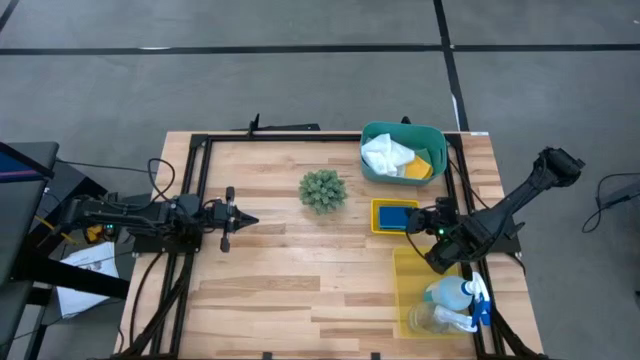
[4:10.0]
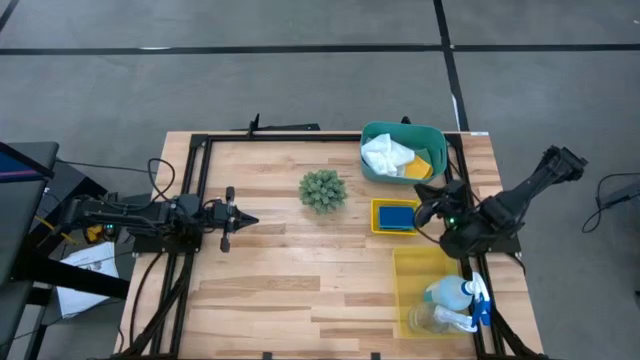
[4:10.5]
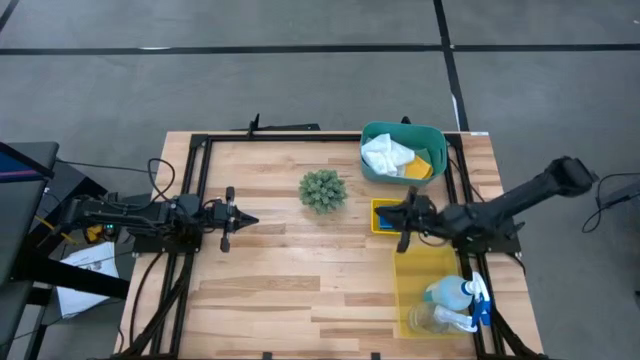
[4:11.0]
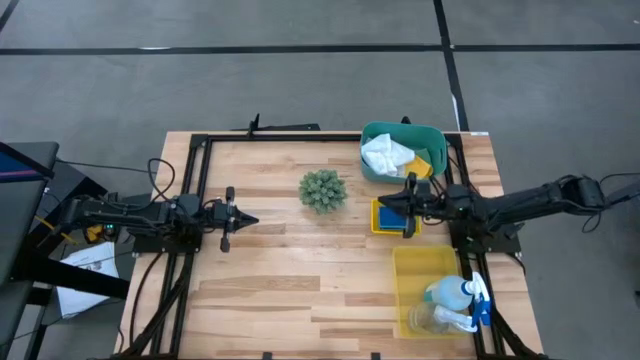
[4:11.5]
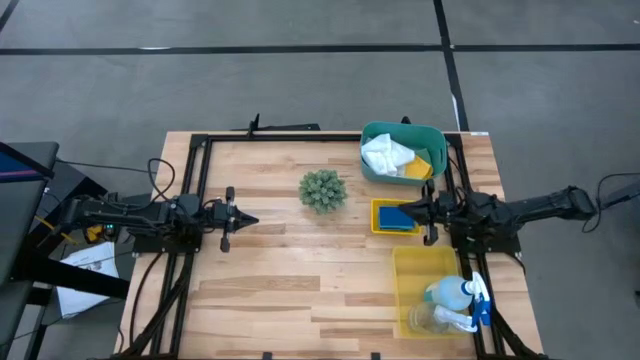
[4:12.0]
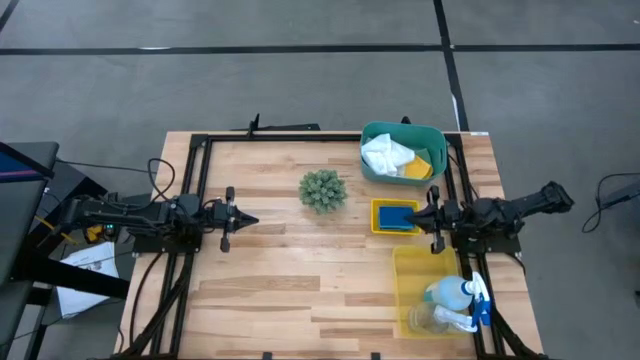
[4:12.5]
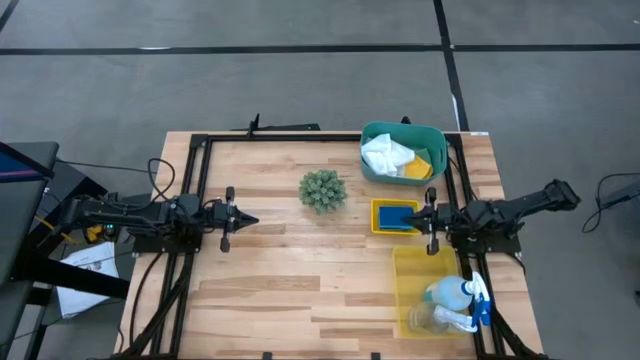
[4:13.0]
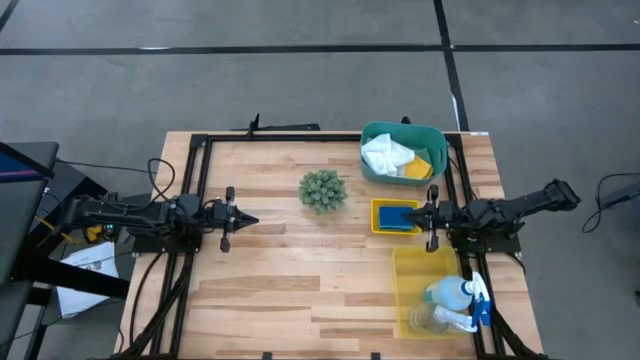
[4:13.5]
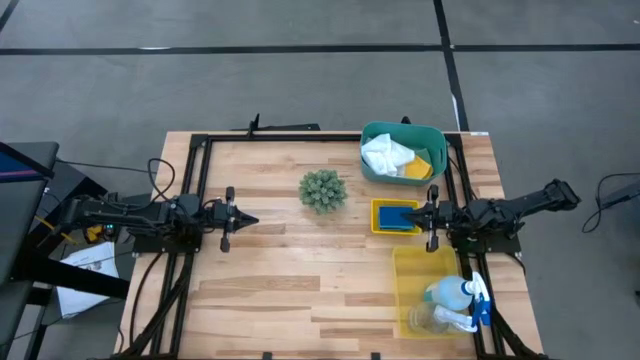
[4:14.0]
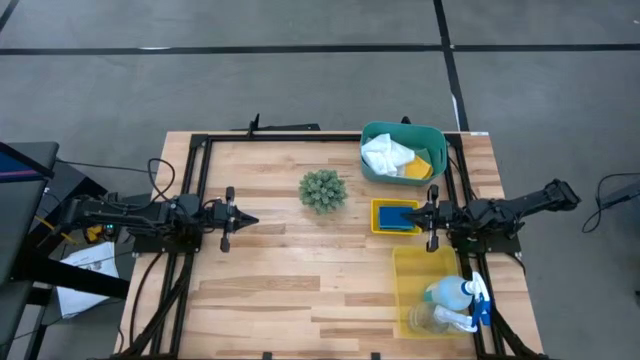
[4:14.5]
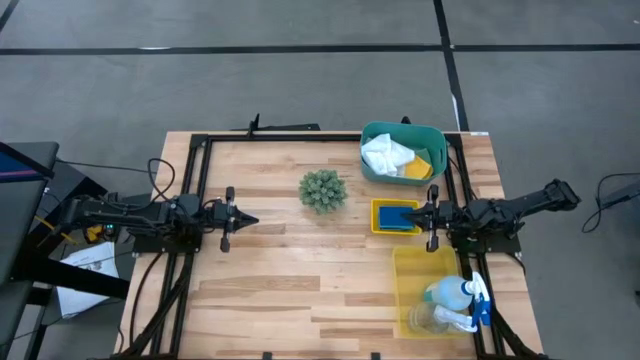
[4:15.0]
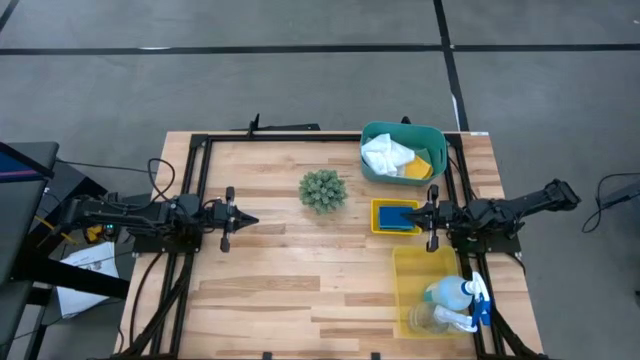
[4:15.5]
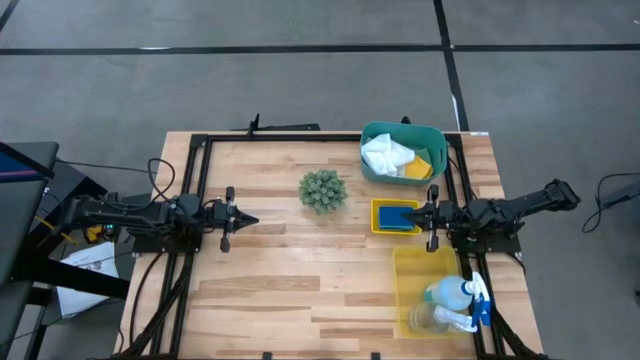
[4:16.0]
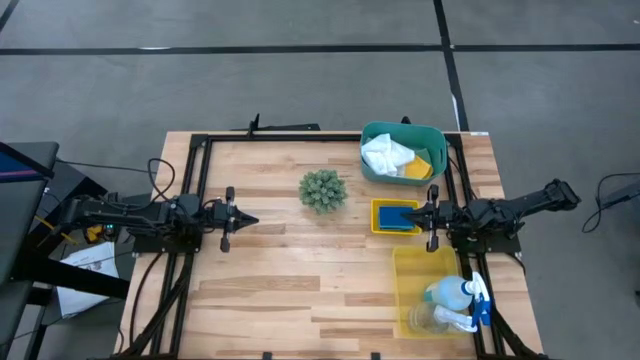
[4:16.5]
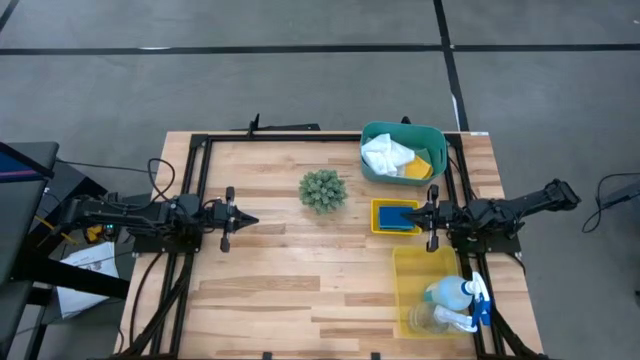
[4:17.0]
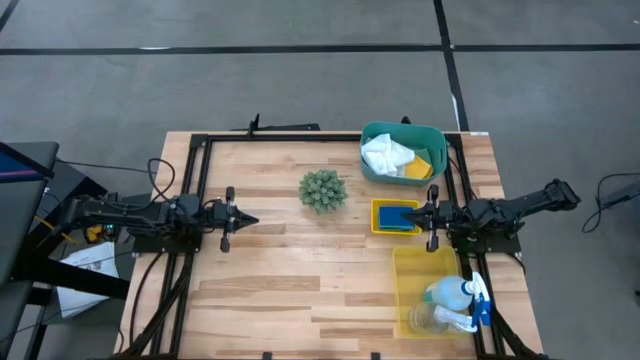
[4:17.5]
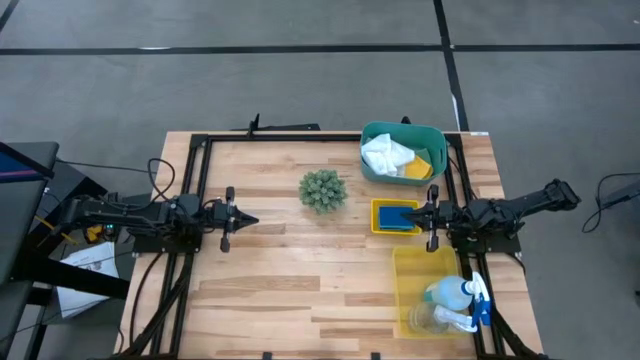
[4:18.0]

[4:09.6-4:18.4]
Task: Pick & Place Kitchen Items
Return to Home Position

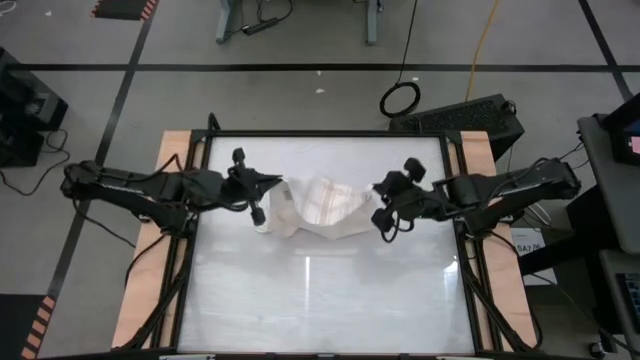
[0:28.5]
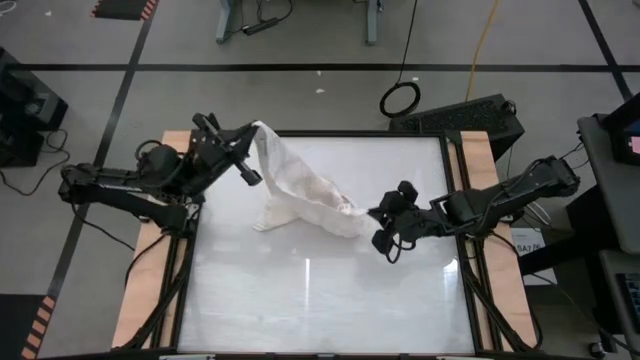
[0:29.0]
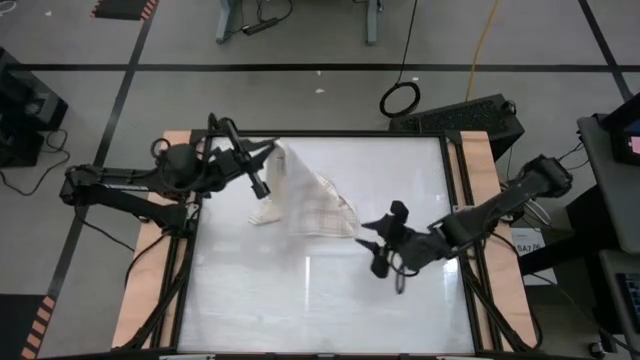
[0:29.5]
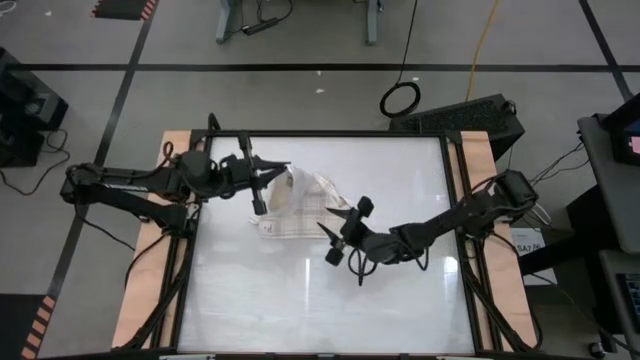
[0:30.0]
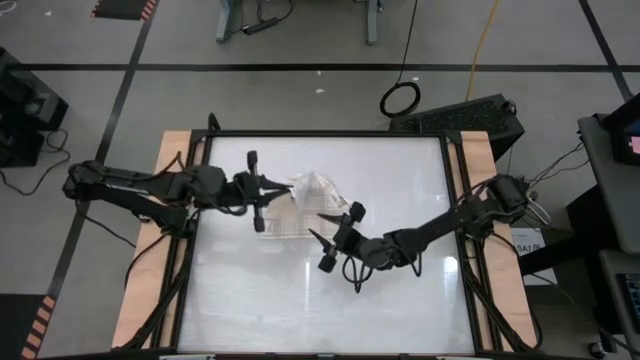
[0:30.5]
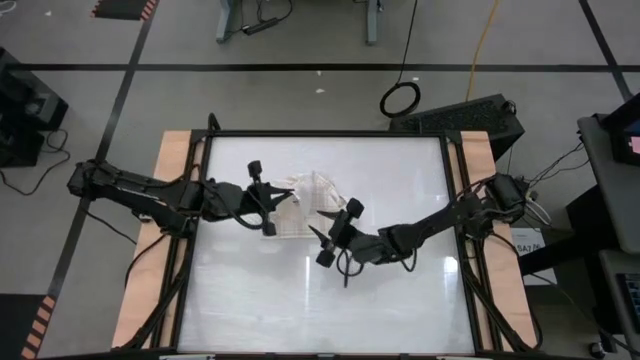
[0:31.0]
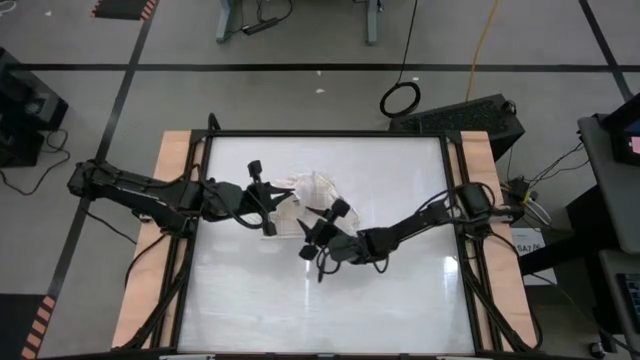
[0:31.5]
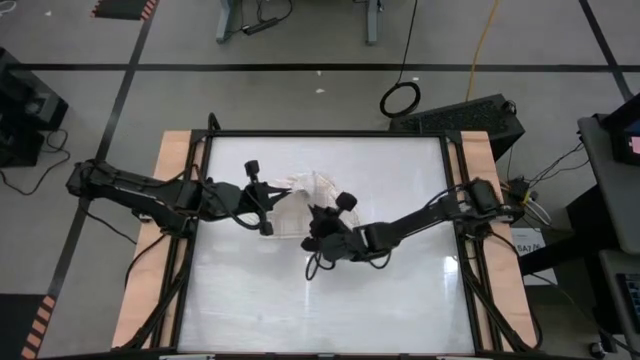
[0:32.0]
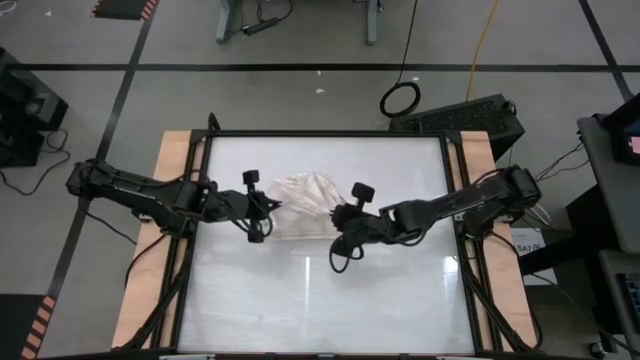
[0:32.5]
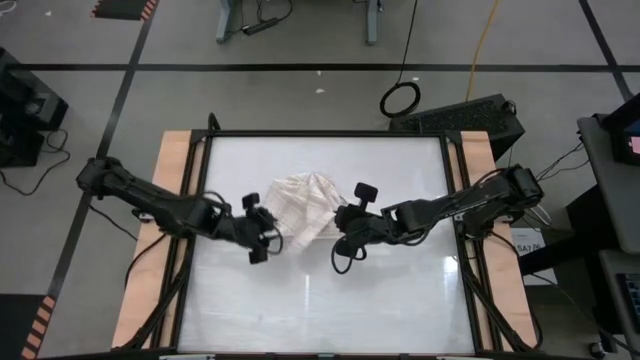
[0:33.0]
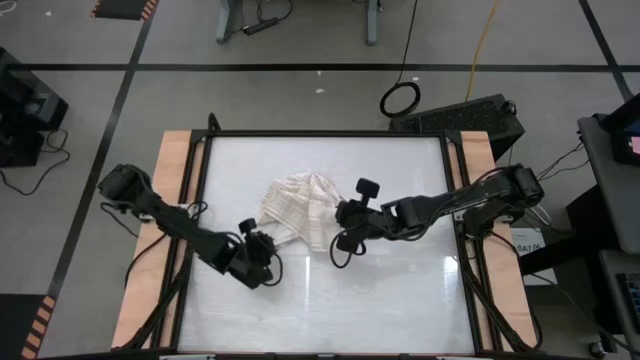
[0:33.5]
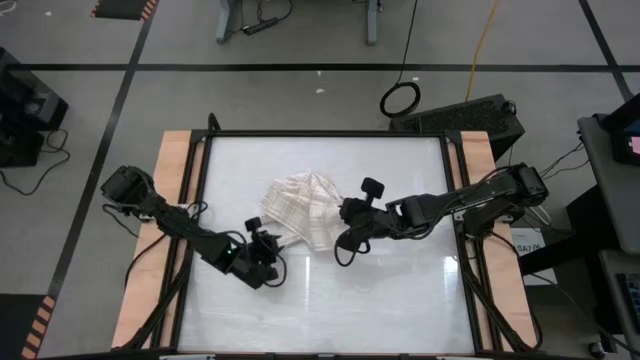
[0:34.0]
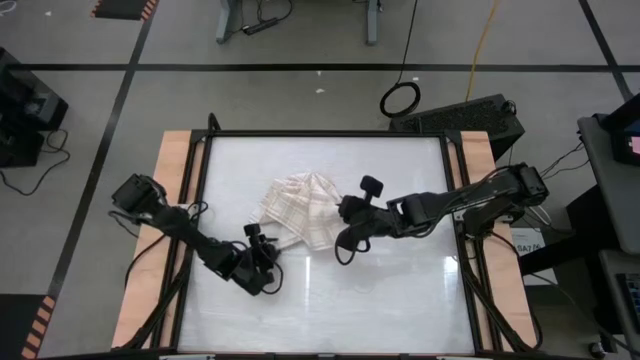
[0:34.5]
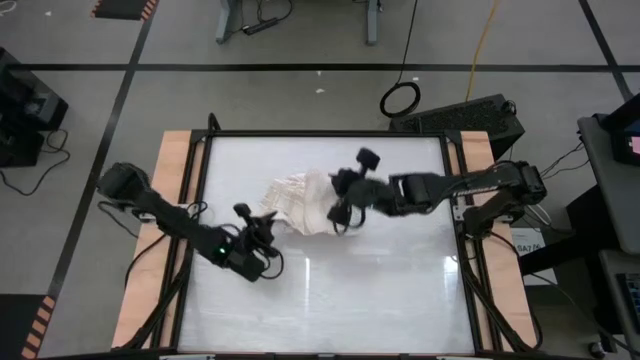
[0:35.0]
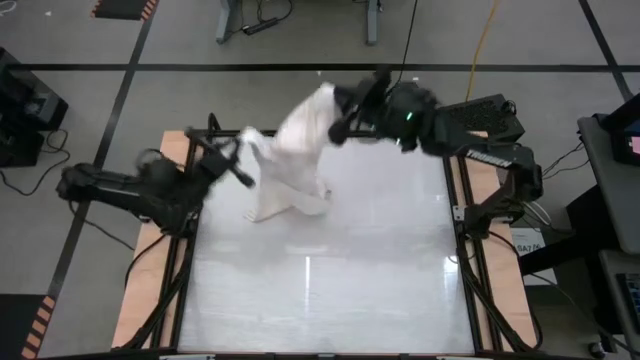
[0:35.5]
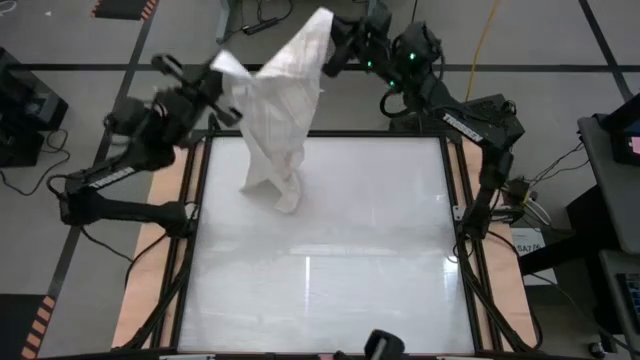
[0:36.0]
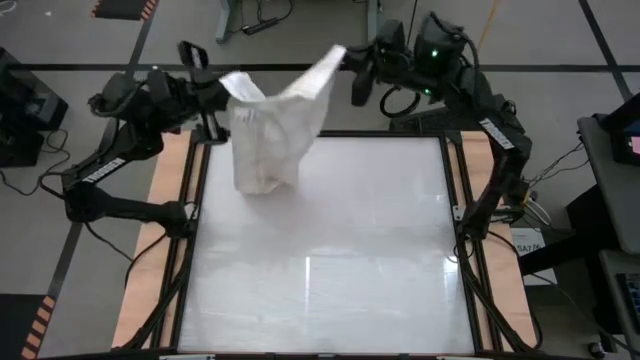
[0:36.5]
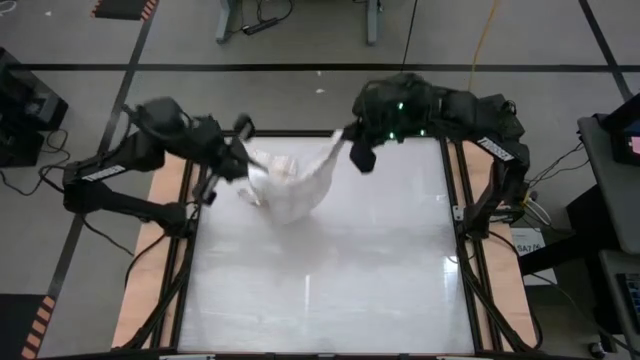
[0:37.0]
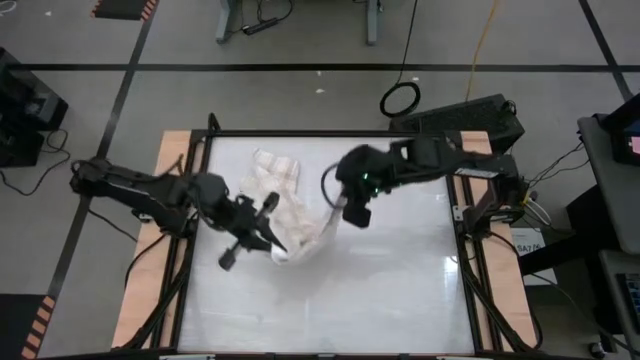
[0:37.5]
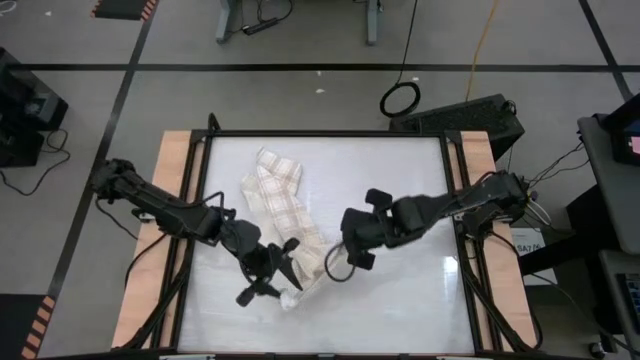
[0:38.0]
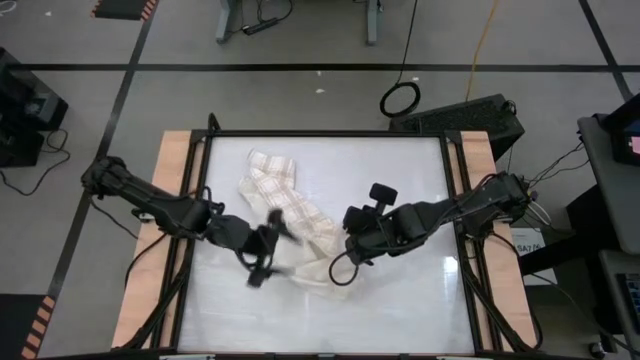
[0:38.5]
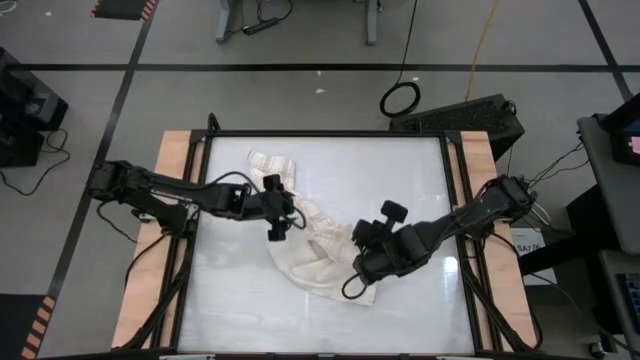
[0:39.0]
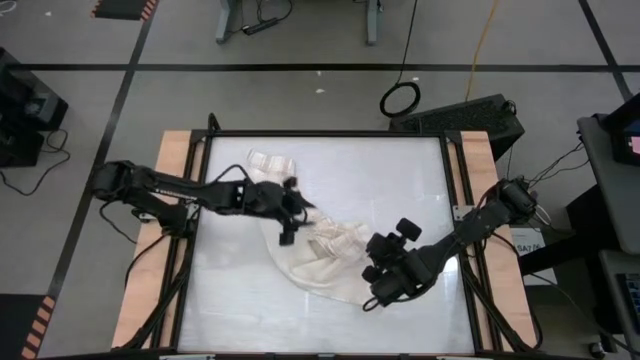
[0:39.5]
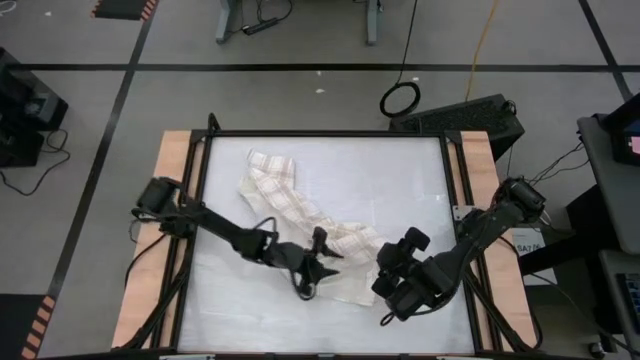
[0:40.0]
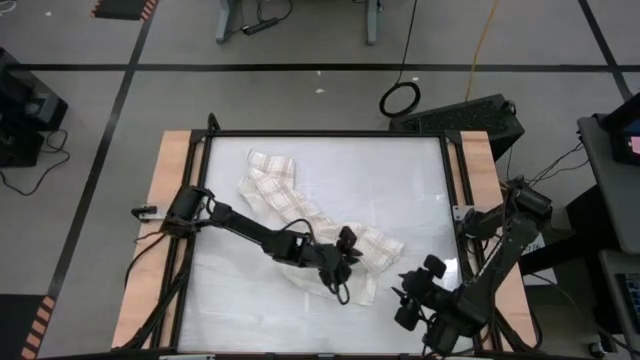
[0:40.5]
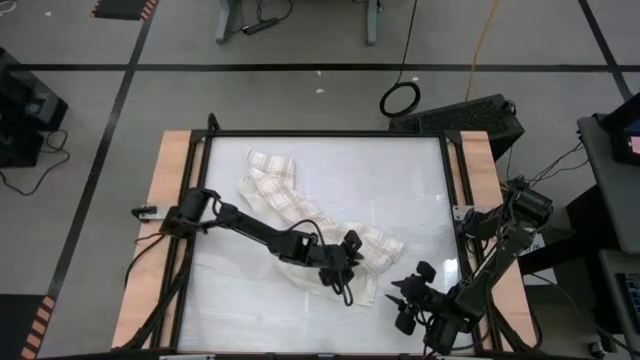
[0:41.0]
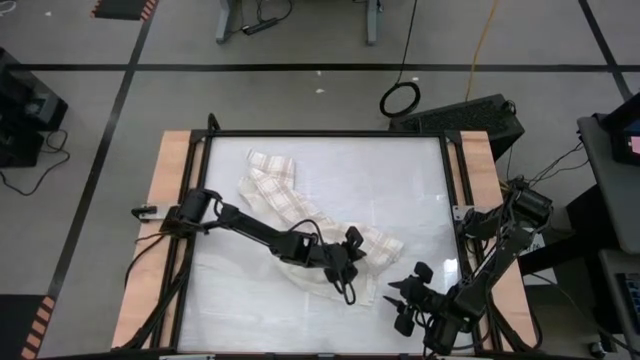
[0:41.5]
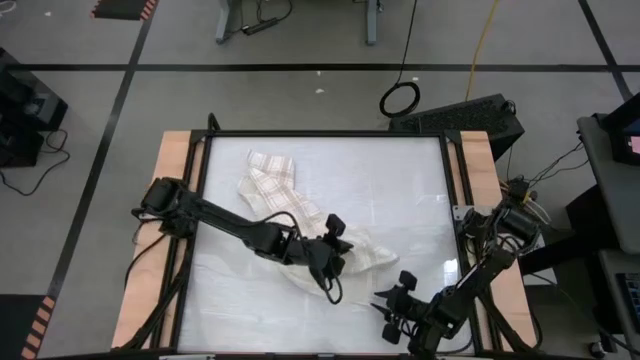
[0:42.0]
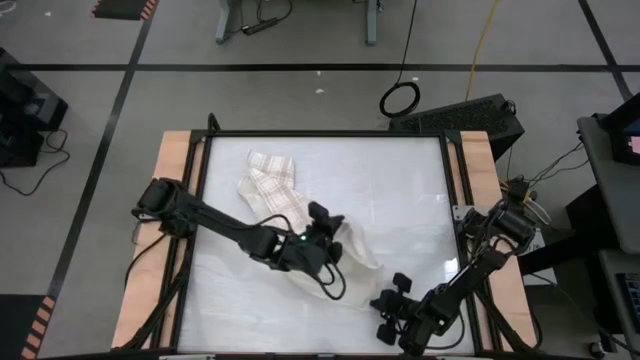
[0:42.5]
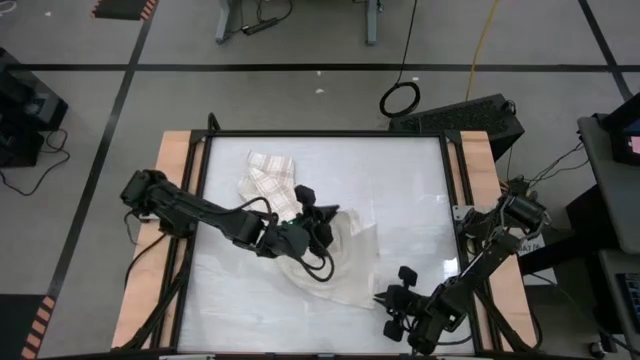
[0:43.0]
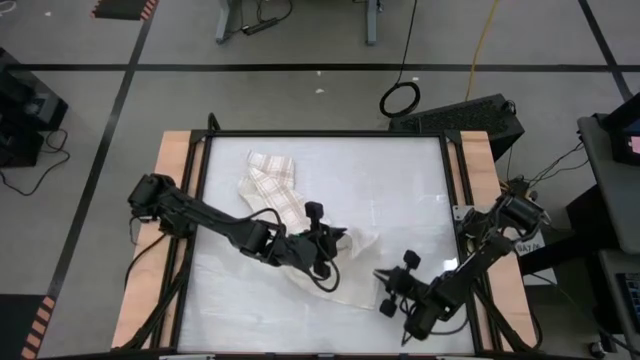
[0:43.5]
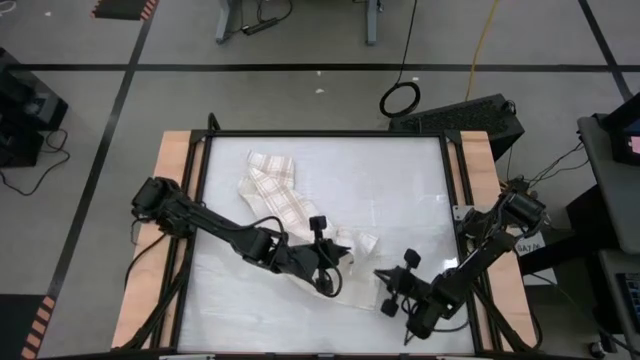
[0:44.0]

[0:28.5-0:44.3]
Task: Roll towel
Roll the white-brown patterned towel
